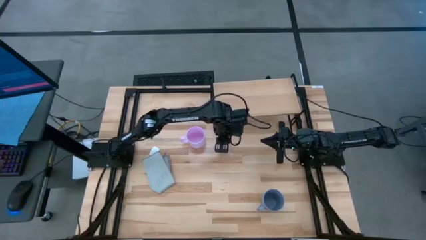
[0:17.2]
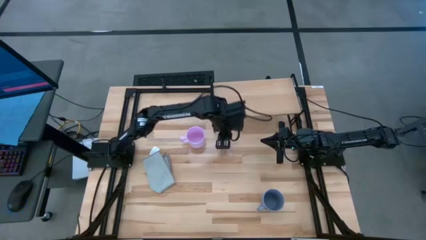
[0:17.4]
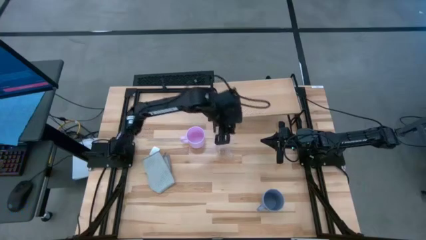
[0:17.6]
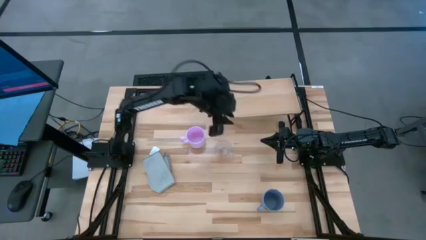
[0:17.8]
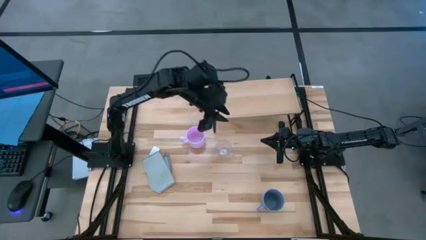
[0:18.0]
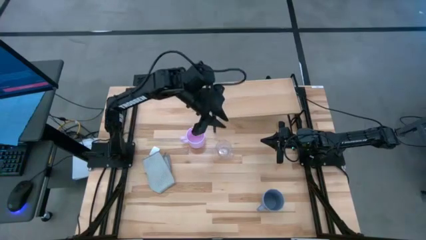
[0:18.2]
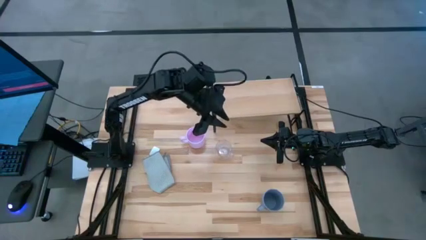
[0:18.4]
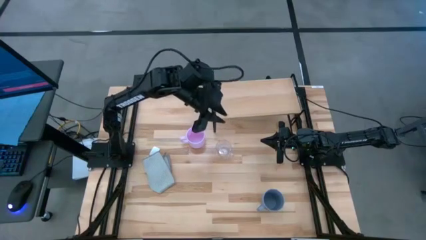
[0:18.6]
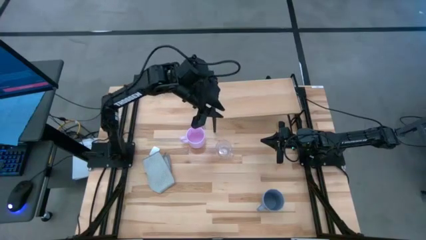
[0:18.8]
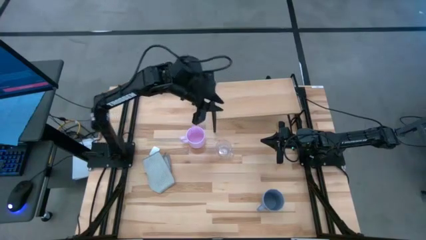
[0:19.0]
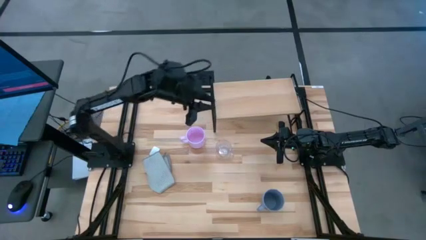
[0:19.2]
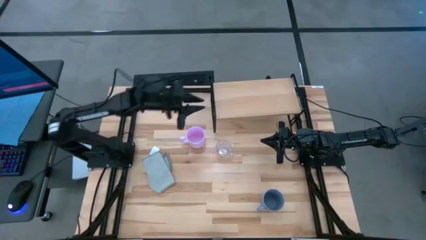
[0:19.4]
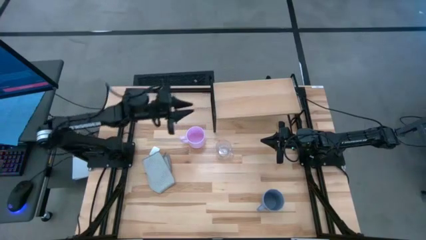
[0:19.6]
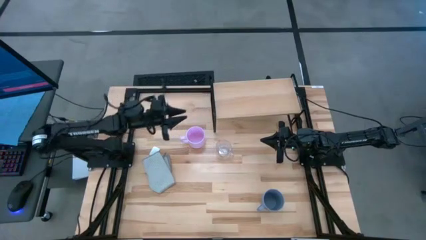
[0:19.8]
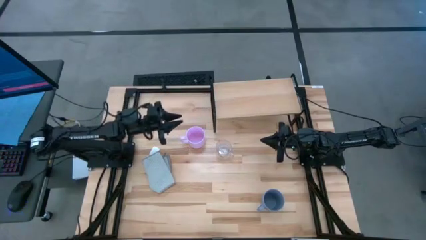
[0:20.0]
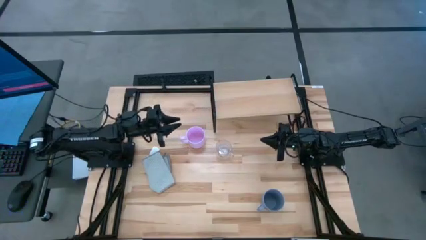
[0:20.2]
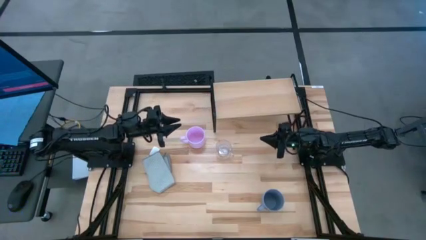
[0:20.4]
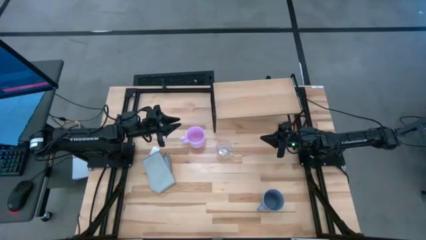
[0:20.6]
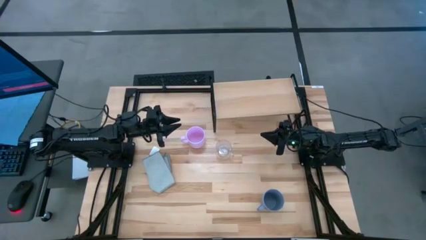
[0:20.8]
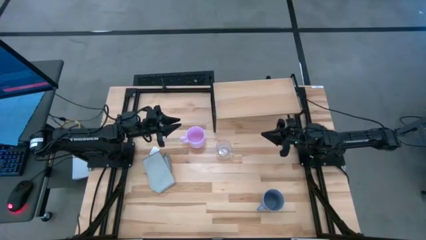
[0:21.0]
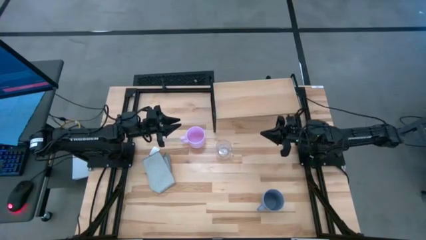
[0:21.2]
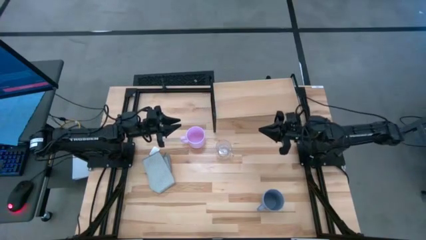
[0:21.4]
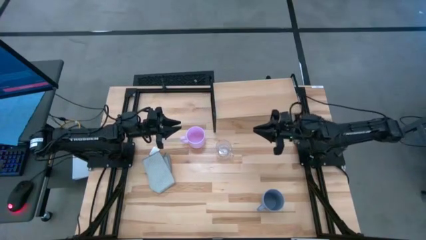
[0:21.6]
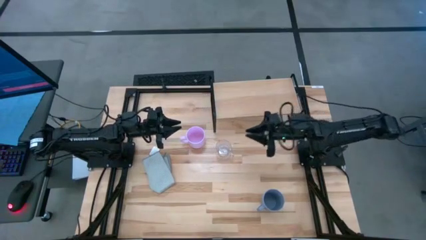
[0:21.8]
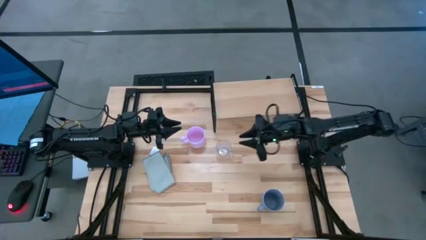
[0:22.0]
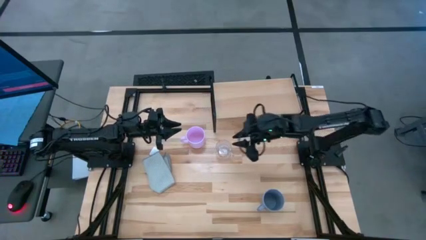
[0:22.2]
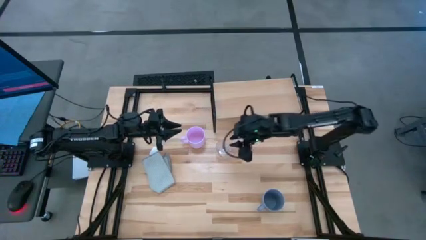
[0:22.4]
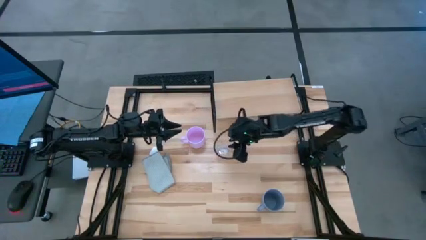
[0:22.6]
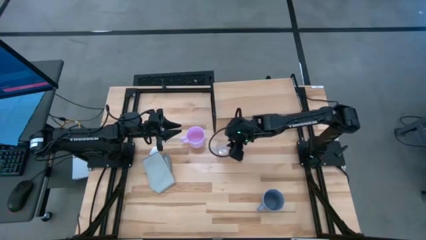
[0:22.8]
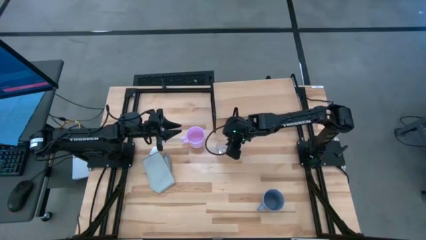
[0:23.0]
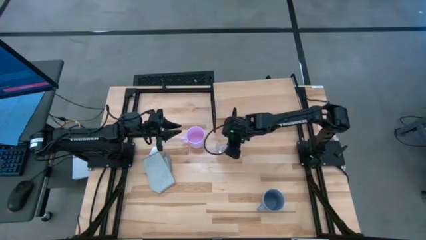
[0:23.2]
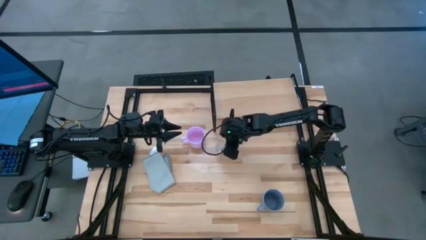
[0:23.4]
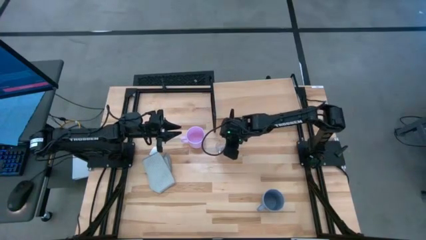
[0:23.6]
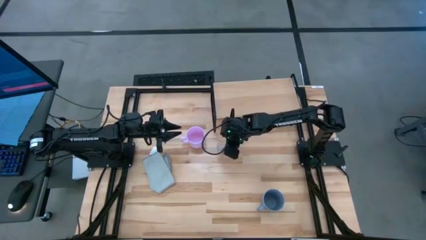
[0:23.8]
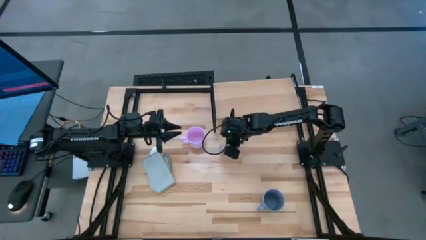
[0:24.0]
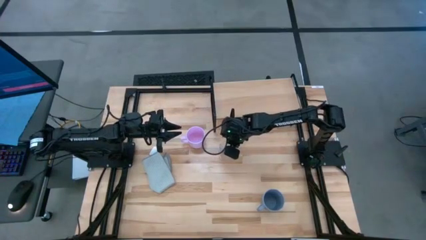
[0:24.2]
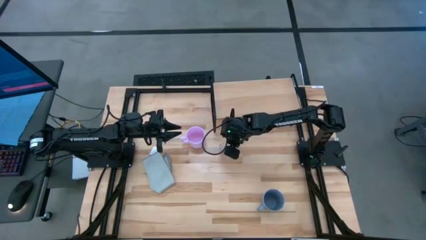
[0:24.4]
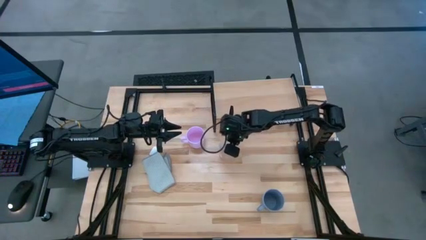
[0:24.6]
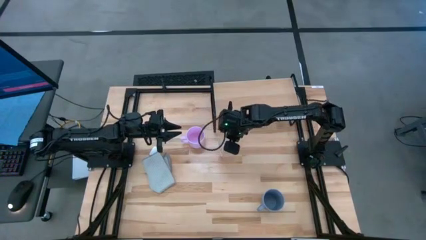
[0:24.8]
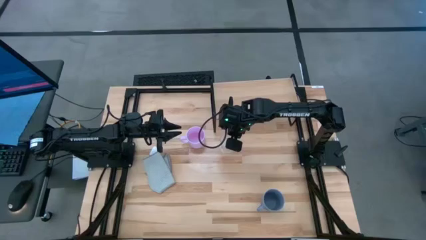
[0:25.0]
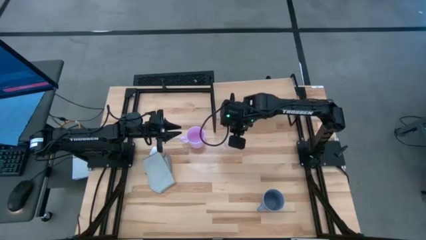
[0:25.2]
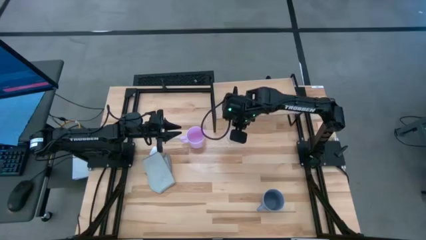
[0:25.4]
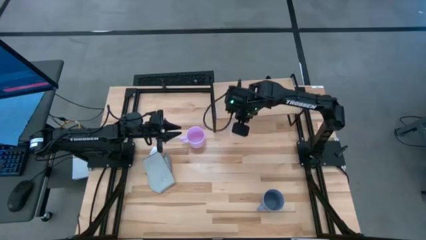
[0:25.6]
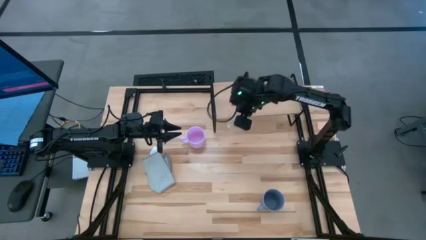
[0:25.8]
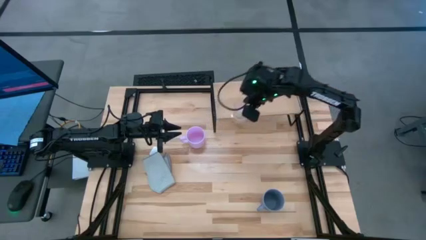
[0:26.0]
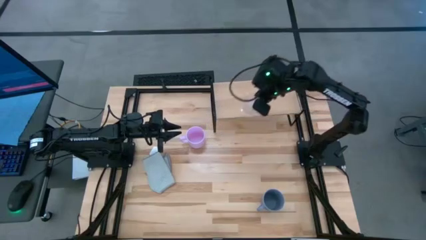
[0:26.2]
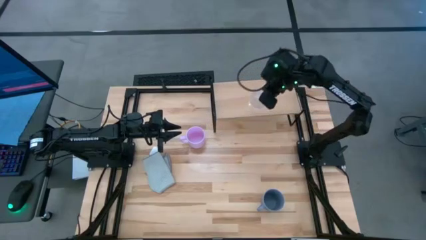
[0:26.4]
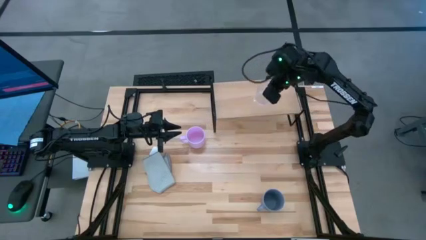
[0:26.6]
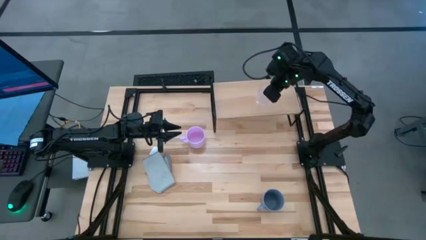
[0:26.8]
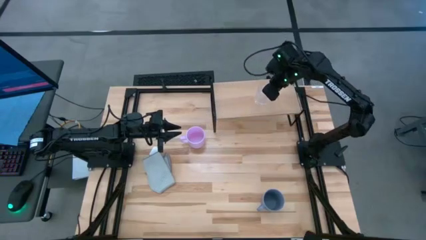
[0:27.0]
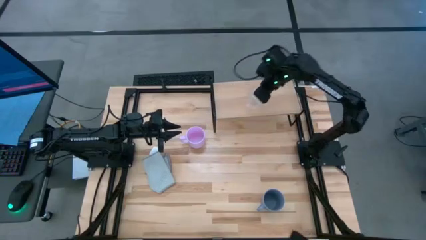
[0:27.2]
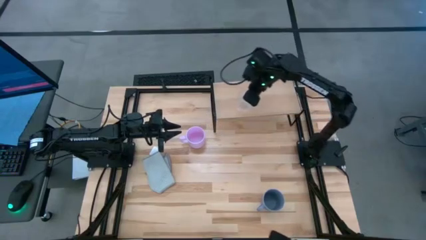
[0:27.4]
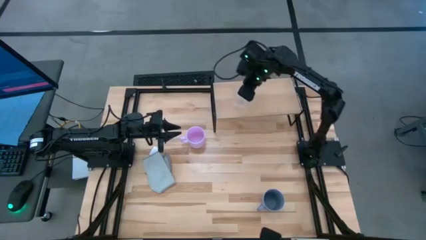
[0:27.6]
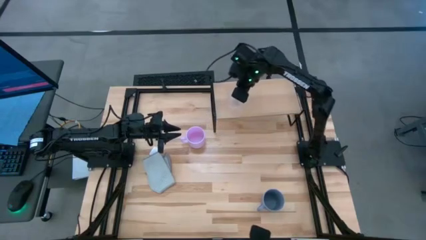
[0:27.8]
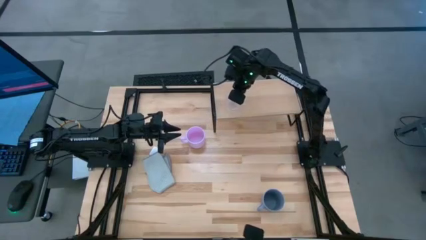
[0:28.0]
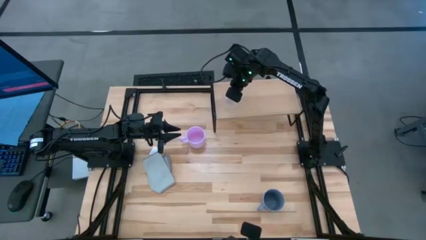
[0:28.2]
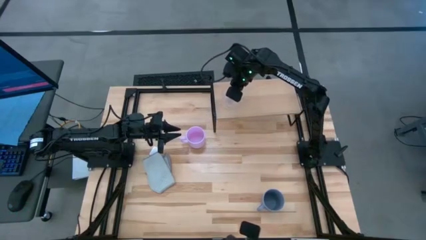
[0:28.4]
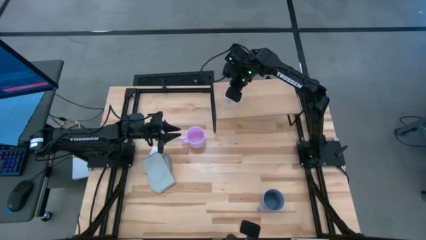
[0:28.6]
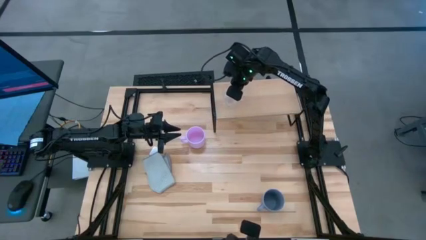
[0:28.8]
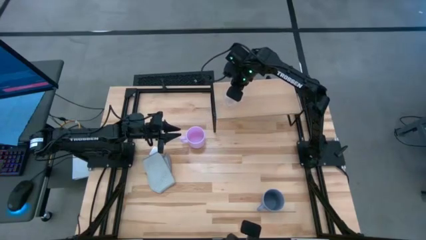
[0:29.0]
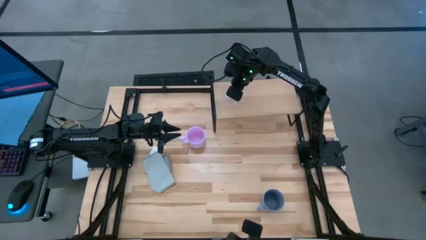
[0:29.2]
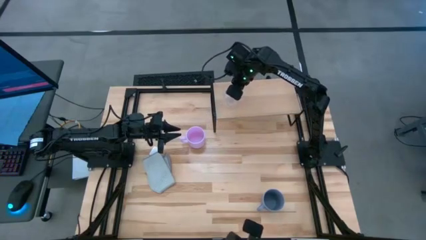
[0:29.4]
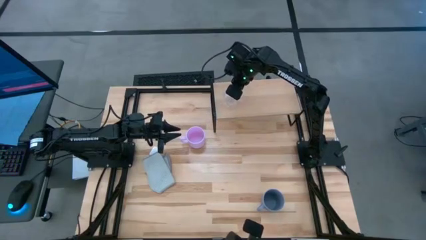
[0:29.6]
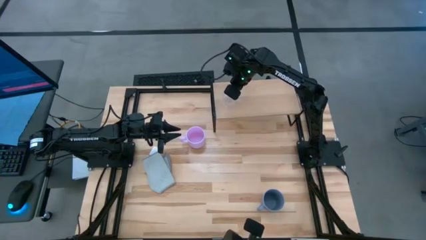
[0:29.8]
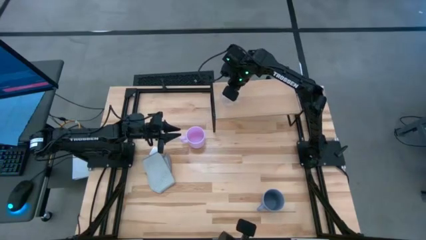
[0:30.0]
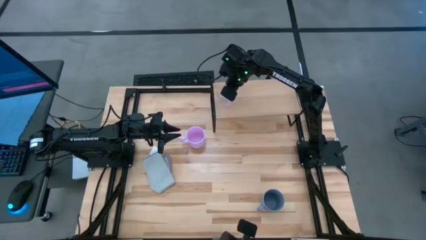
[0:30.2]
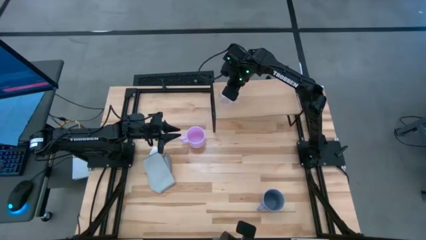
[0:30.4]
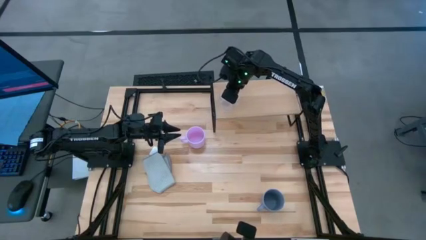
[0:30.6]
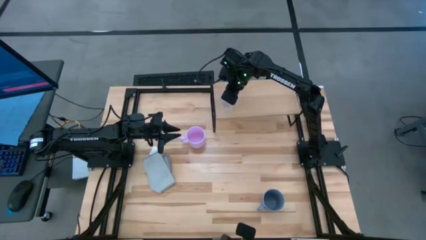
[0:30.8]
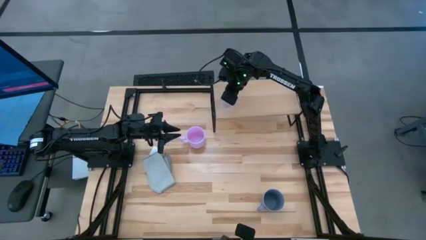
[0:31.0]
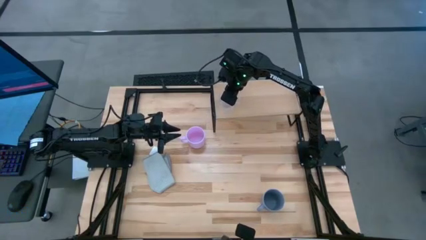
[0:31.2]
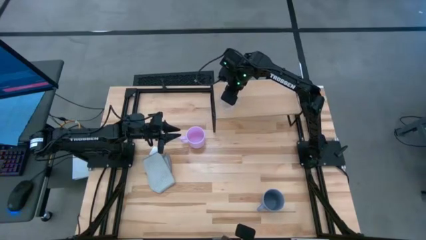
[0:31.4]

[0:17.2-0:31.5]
Task: Stack small to large cups/mugs on shelf
Put the transparent mug on the shelf

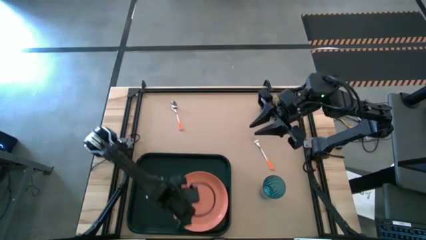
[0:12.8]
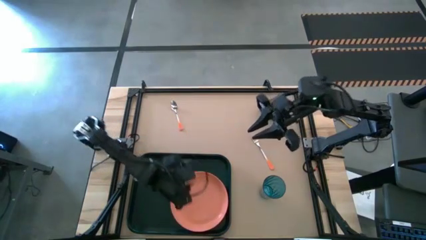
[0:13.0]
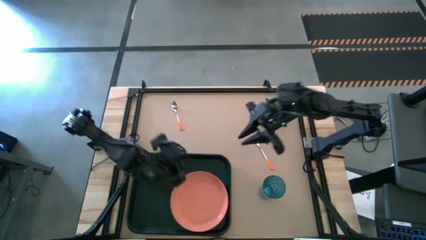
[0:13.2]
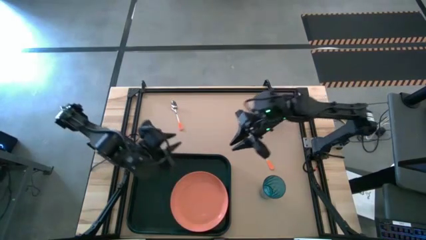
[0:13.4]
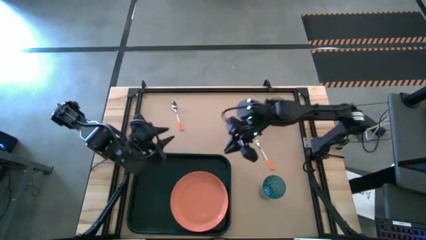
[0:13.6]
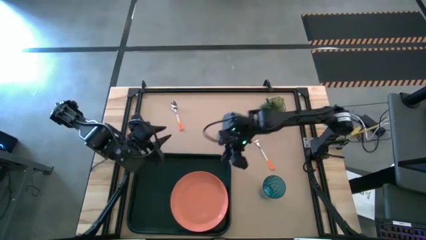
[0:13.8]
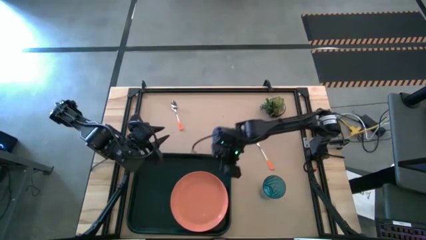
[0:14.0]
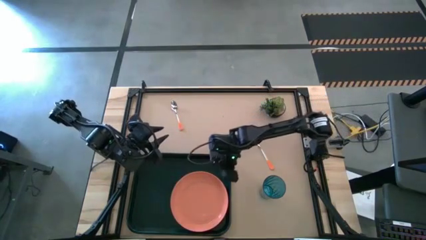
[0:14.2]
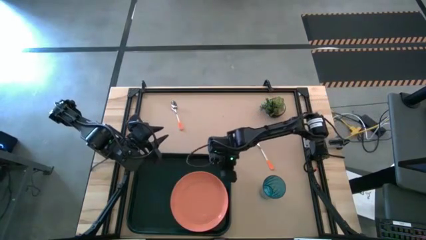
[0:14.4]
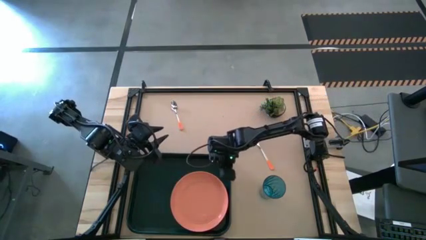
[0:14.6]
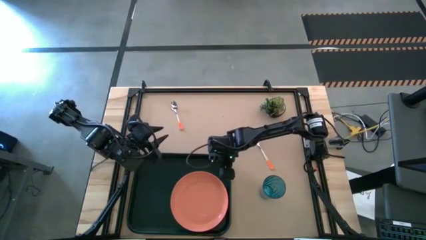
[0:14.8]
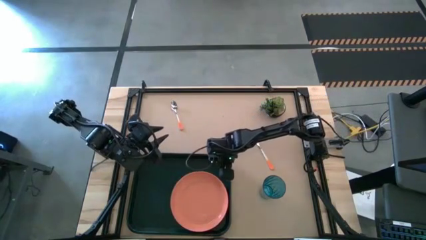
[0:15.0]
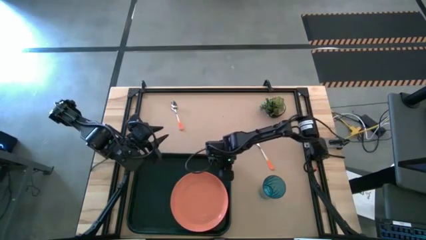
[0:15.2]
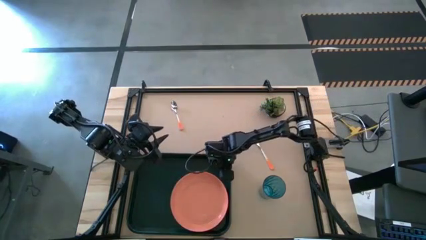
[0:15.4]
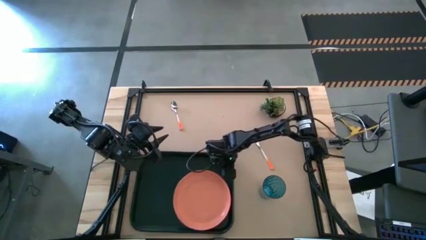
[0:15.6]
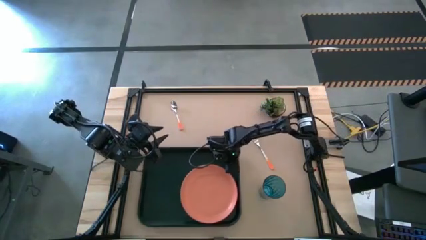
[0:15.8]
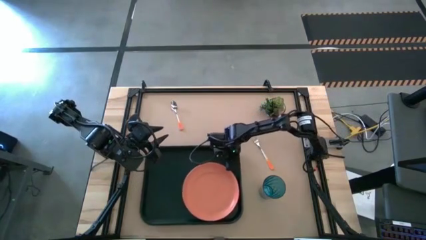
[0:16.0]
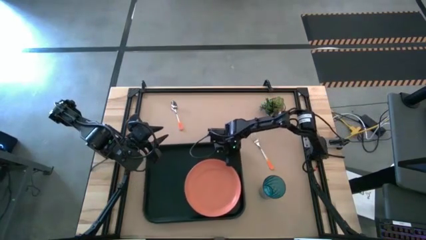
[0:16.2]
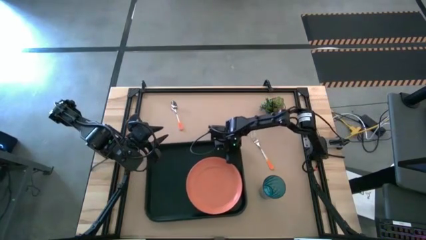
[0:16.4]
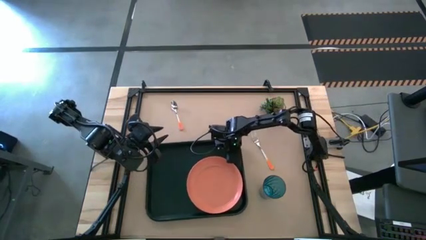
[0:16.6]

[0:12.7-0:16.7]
Task: Pick and place plate/cup/fork/spoon on tray
Move the dark green tray to the middle left of the table
